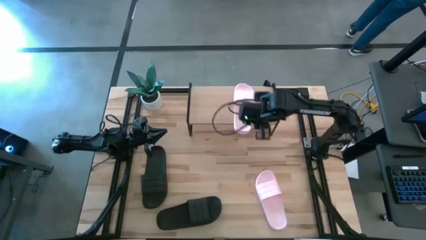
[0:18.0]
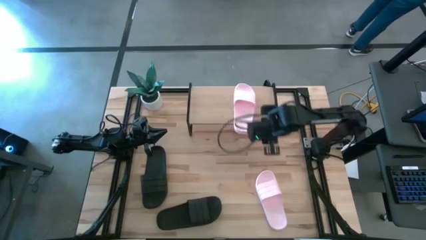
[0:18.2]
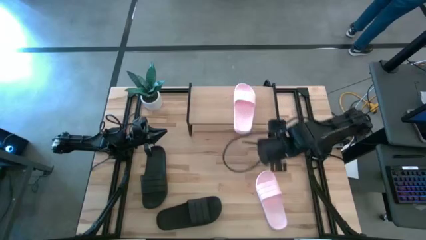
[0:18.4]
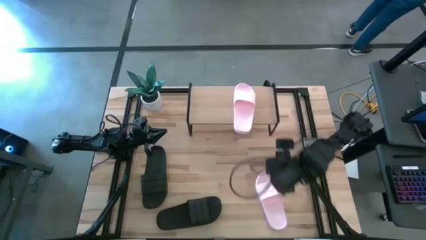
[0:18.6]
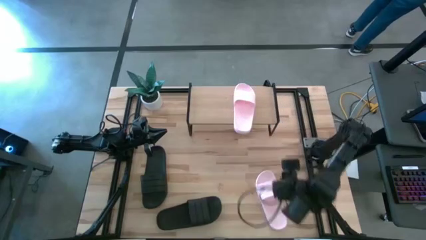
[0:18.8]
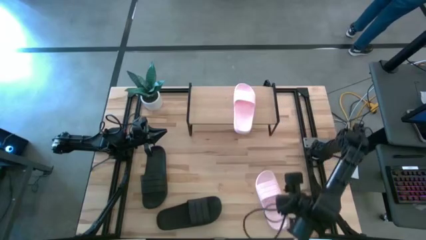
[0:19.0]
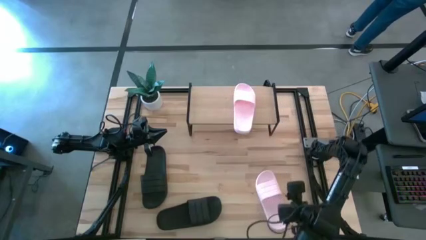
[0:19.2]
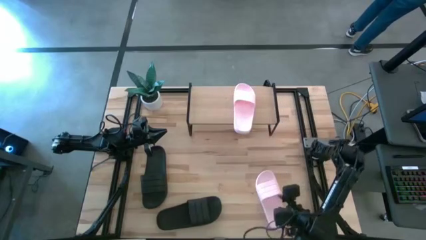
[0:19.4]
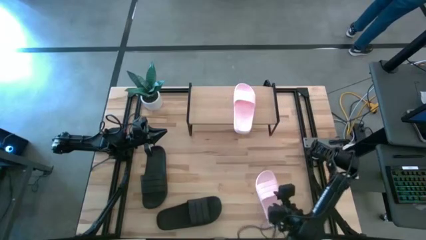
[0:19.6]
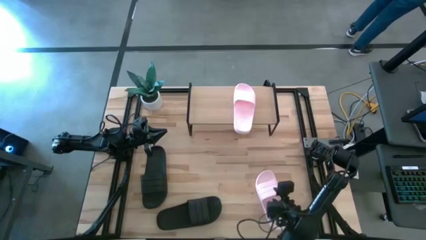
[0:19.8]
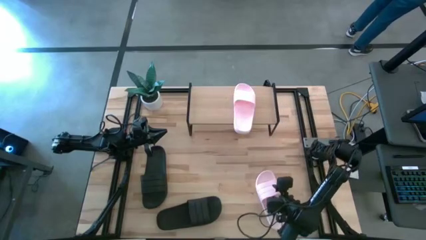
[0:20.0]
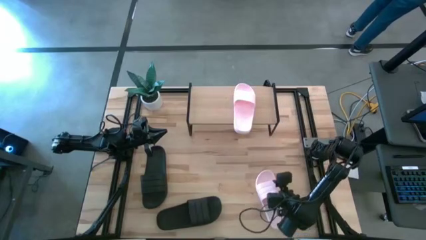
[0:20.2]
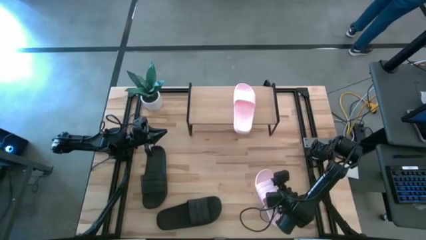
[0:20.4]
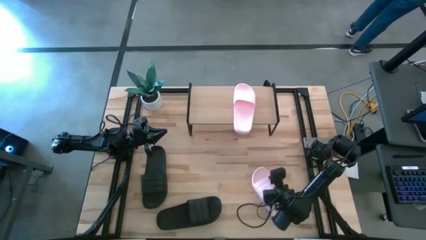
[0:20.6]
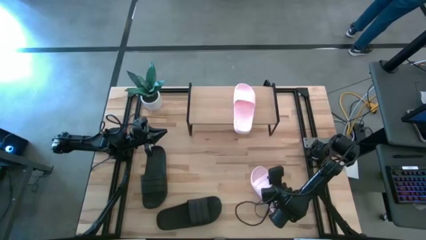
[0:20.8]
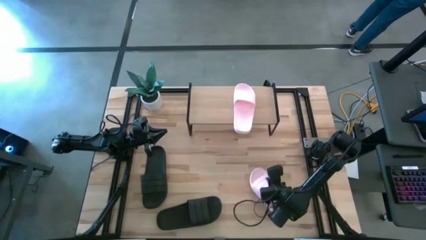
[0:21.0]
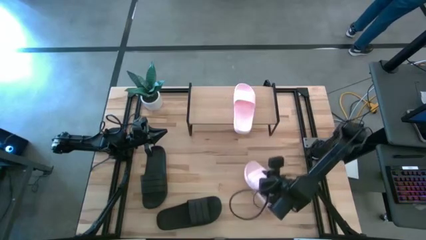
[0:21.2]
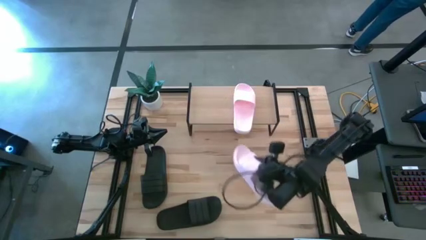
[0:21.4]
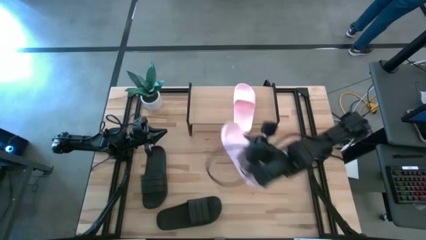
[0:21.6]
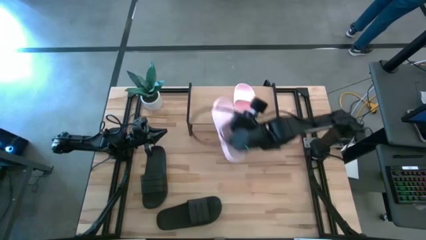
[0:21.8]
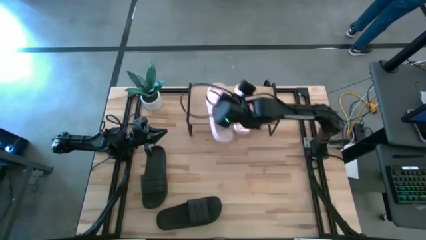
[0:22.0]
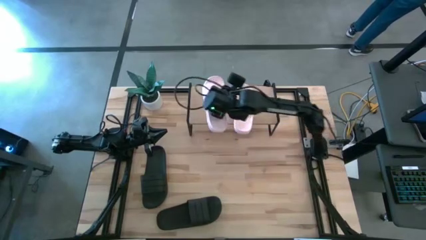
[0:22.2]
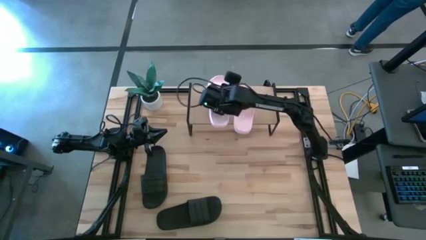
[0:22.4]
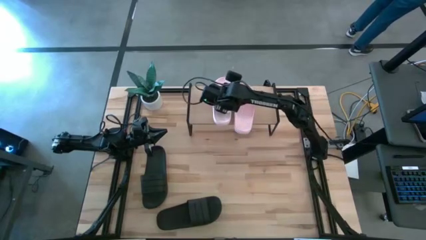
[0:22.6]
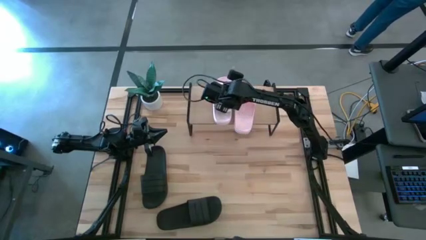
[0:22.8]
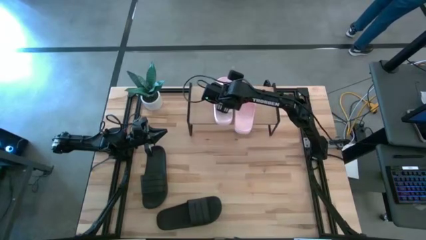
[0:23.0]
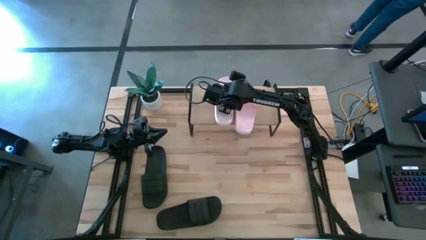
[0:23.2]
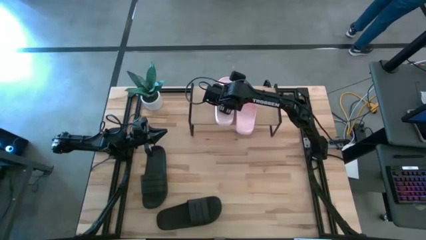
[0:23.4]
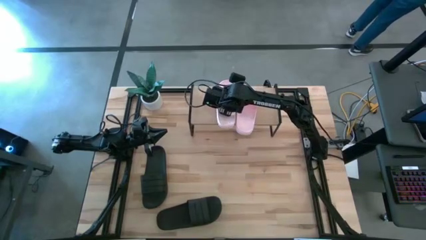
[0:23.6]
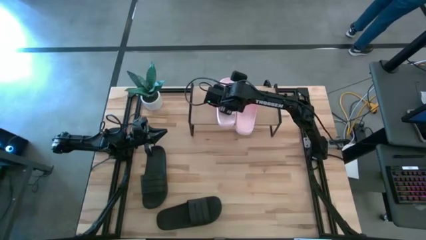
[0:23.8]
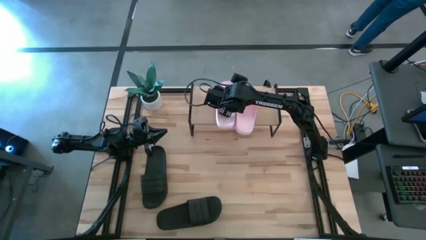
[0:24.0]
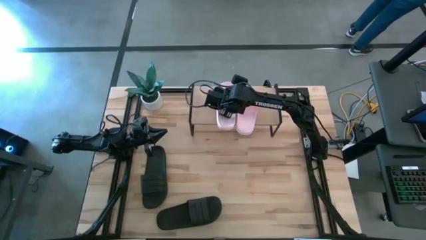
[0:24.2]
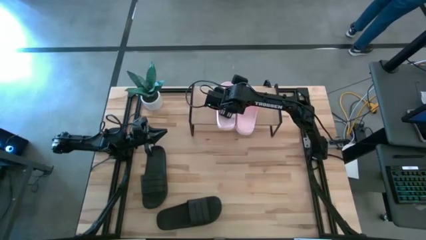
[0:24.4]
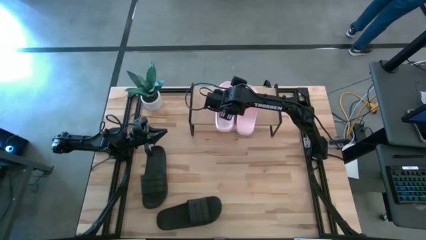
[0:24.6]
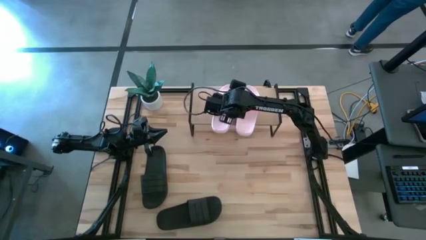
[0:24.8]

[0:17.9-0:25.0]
Task: Pick and place slides into the shelf
Put the pink slipper on the shelf

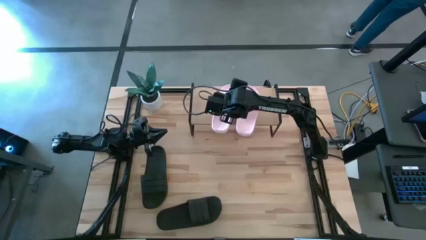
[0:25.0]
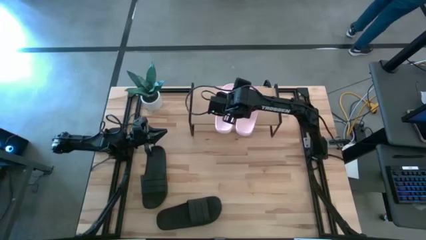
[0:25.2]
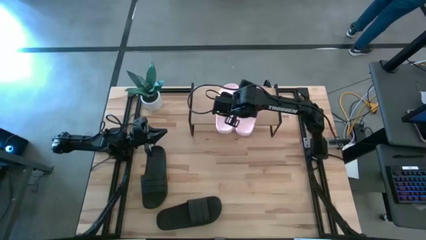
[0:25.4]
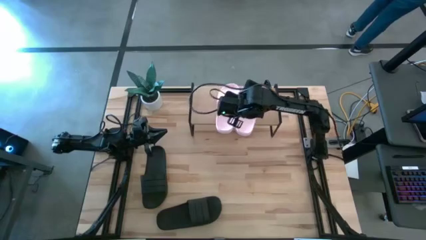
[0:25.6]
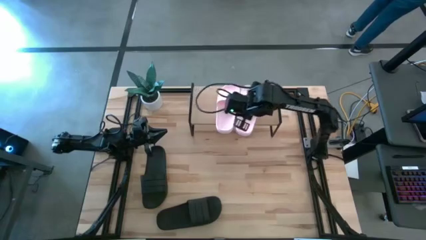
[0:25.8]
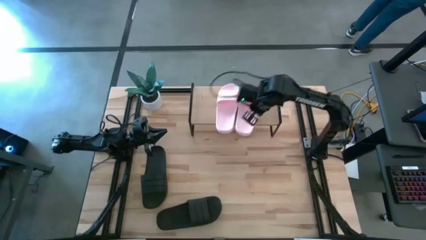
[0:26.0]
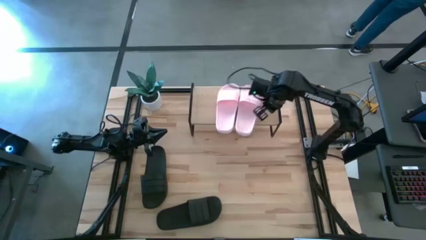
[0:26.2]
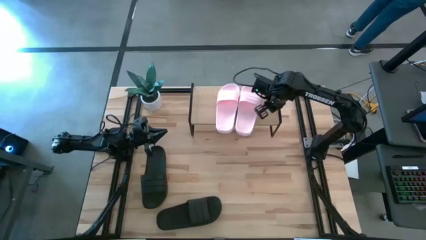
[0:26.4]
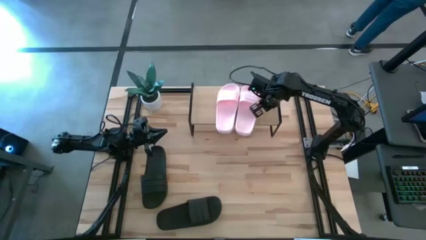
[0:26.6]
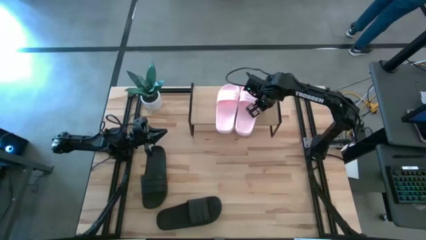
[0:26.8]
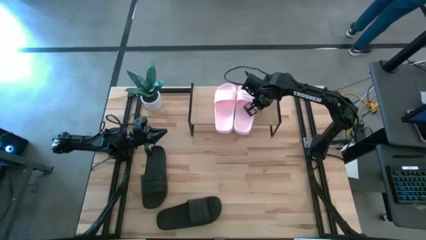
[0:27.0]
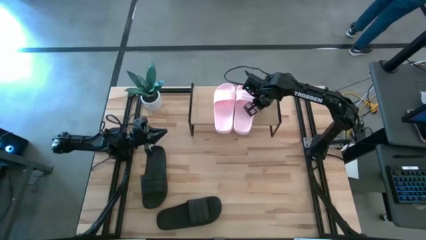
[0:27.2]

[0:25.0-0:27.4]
Adjust the pink slippers on the shelf

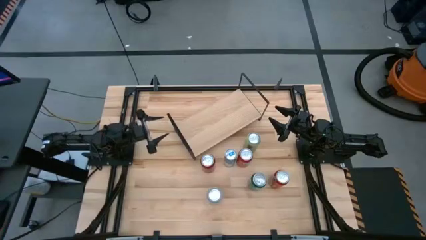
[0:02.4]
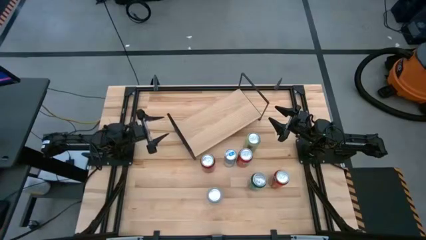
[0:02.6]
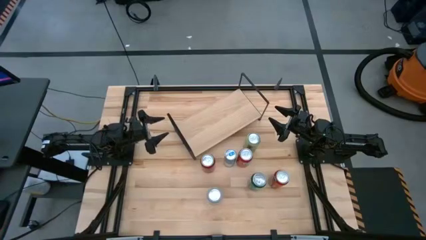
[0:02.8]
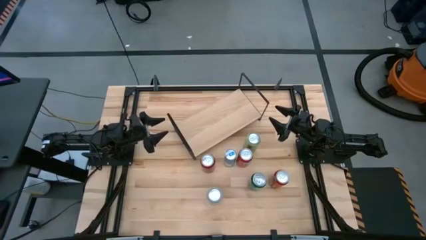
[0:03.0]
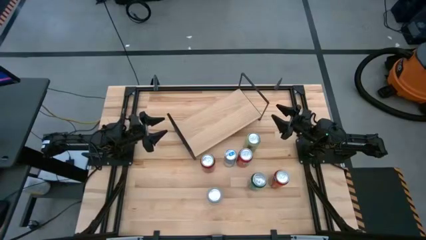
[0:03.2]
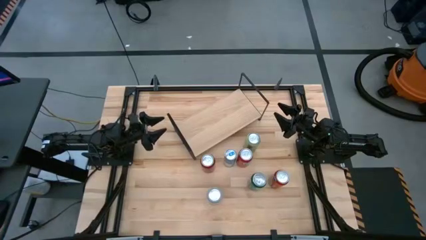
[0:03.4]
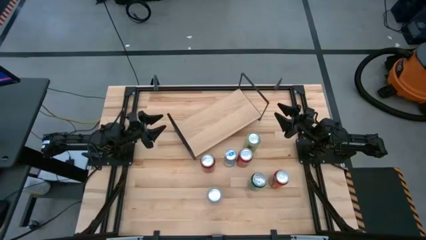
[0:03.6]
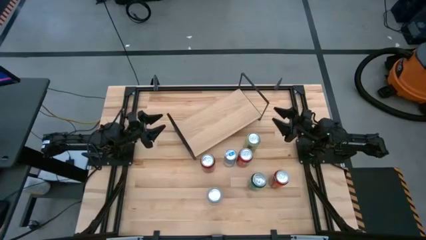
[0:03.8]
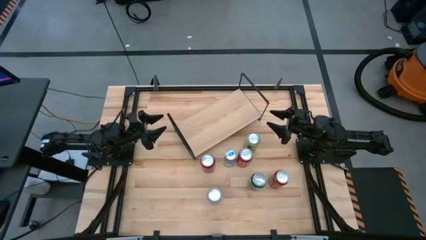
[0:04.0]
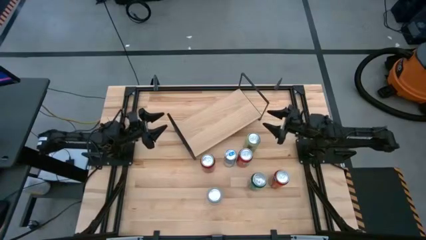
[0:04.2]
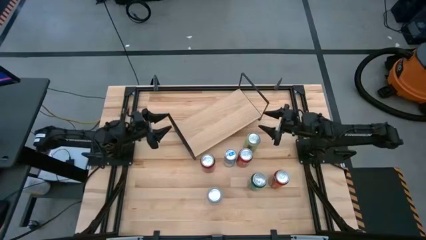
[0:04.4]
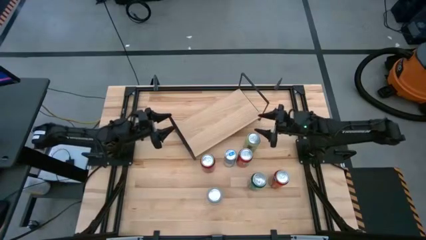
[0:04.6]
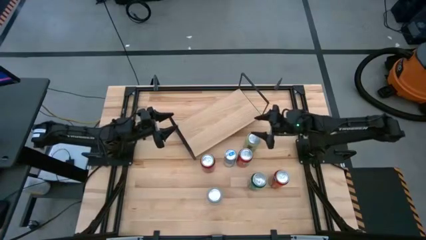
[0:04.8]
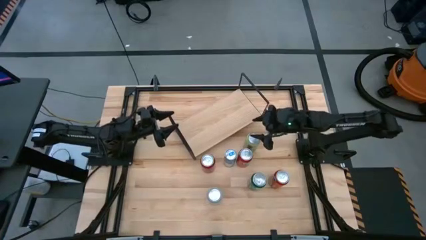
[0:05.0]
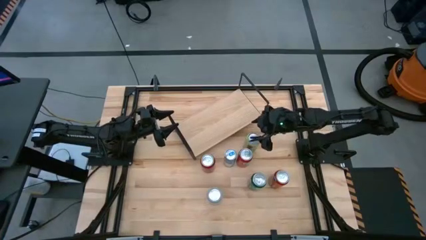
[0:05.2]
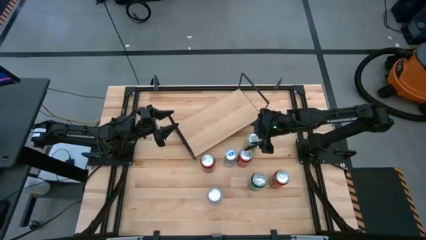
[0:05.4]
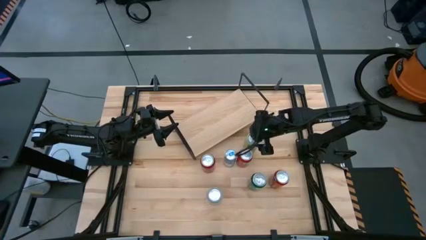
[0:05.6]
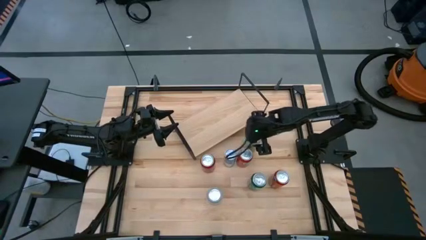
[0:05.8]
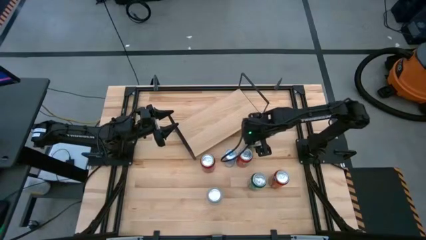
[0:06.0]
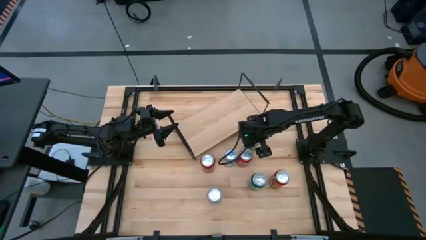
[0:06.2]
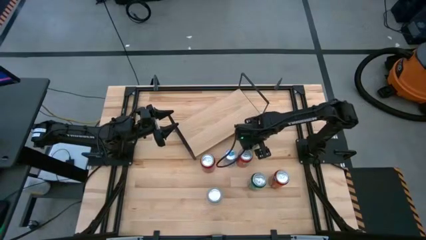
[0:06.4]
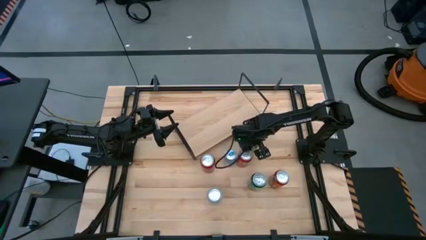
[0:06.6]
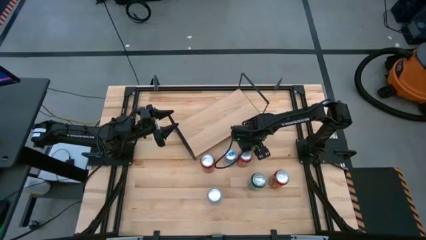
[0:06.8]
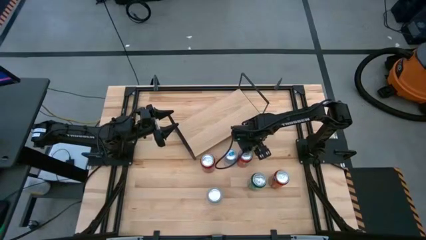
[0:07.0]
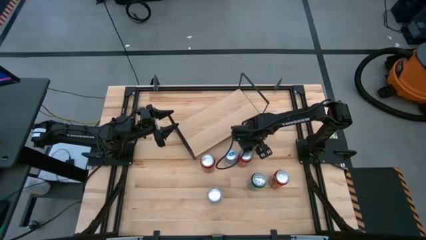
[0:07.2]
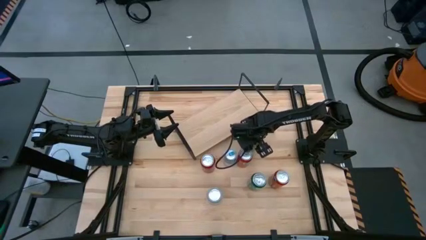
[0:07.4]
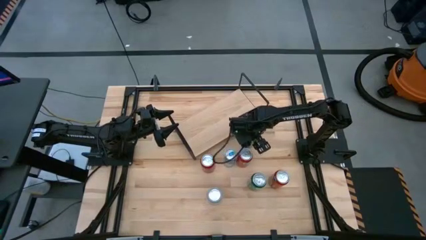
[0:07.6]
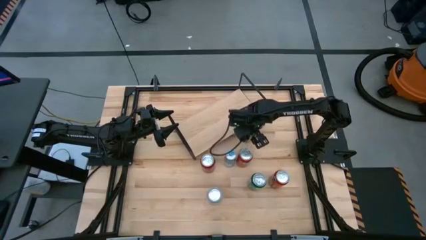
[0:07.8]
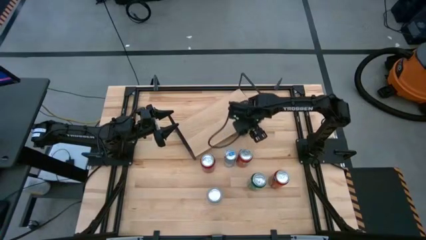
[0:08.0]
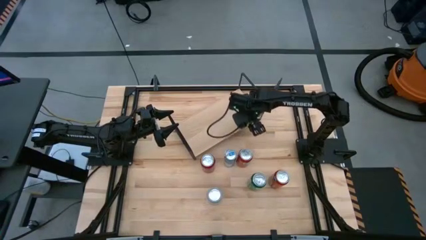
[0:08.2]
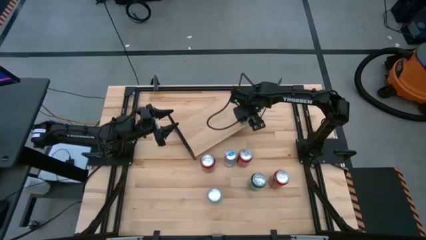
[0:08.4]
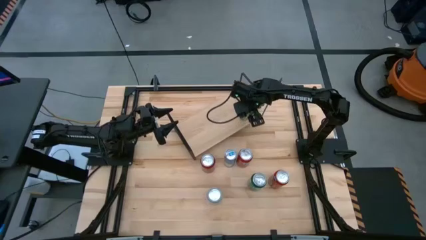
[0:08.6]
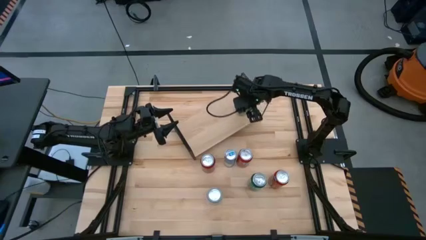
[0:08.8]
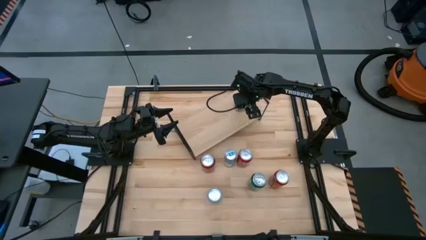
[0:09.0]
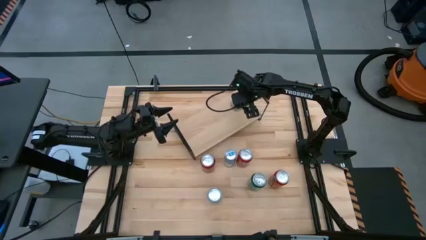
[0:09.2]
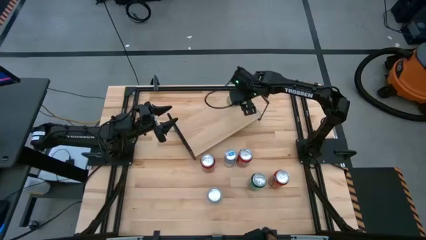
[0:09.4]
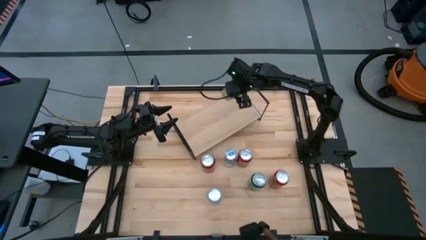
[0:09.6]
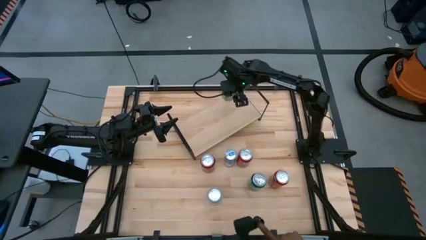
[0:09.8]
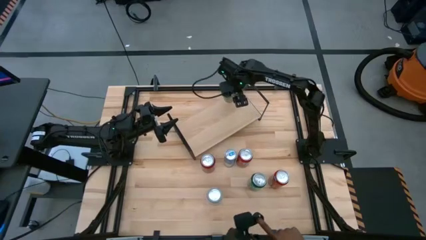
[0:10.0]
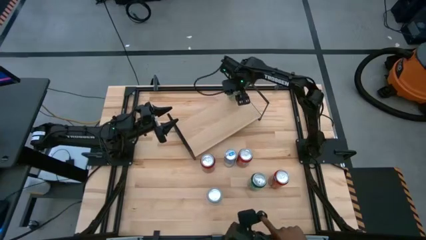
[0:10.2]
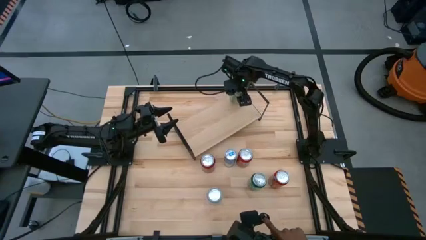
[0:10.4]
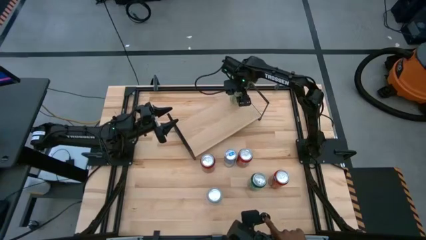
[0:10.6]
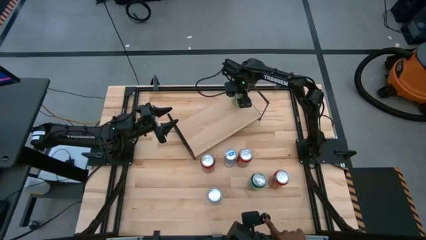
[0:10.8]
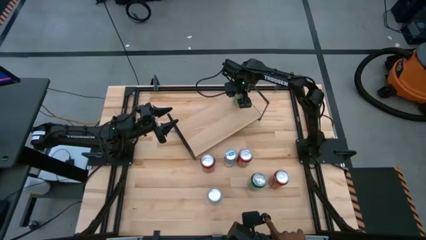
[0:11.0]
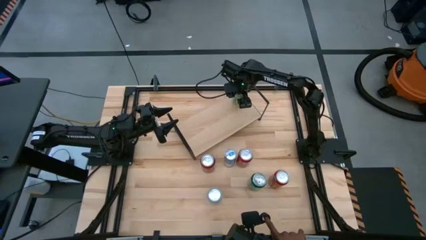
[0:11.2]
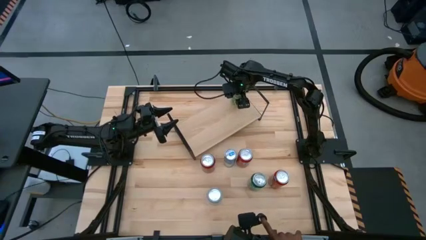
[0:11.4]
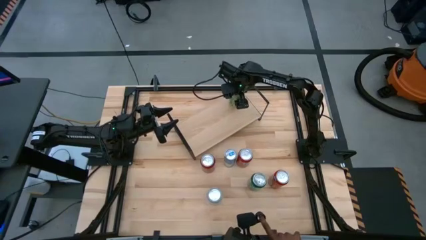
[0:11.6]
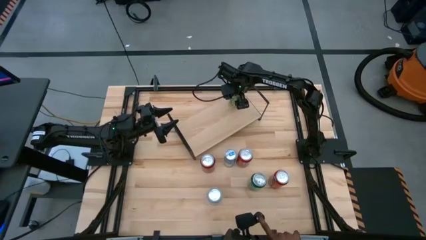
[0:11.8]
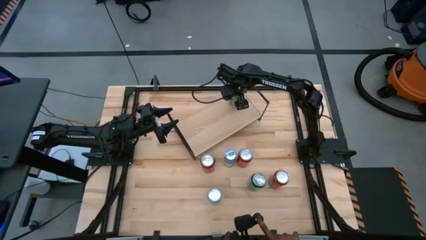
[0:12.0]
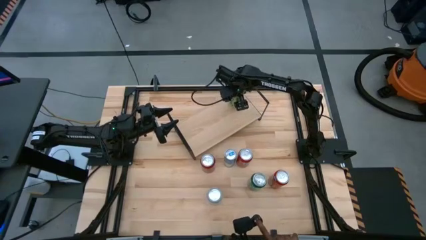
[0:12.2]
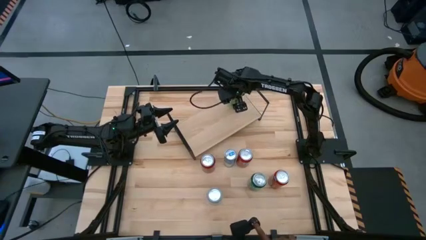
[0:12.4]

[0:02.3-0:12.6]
Task: Place canned beverage on shelf
Put the light green soda can on the shelf
